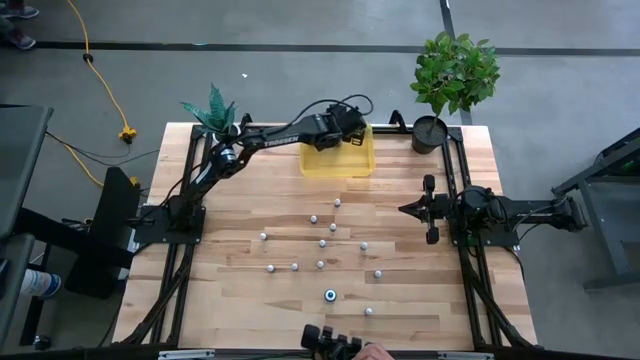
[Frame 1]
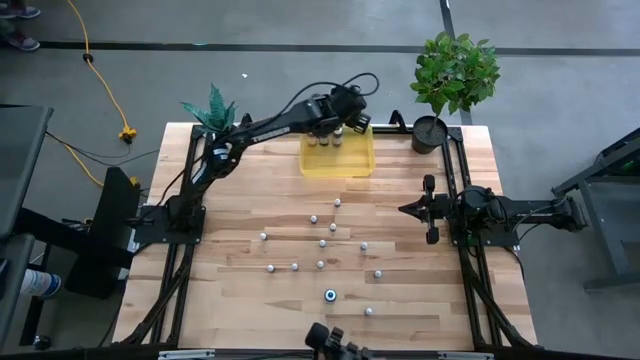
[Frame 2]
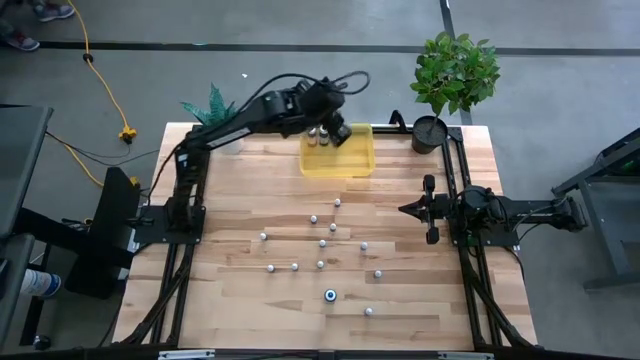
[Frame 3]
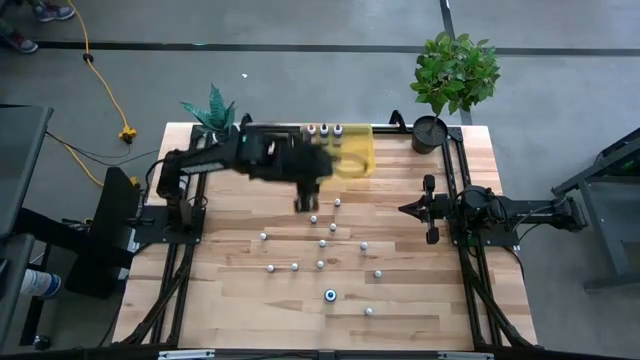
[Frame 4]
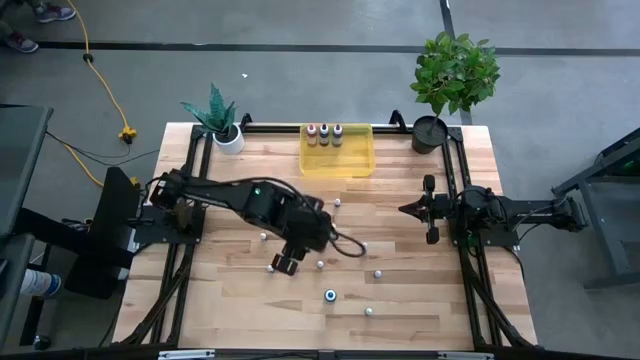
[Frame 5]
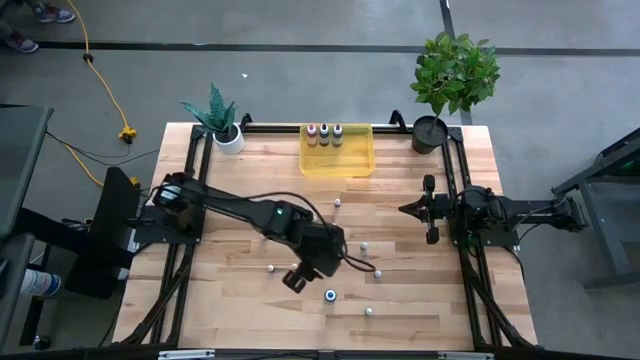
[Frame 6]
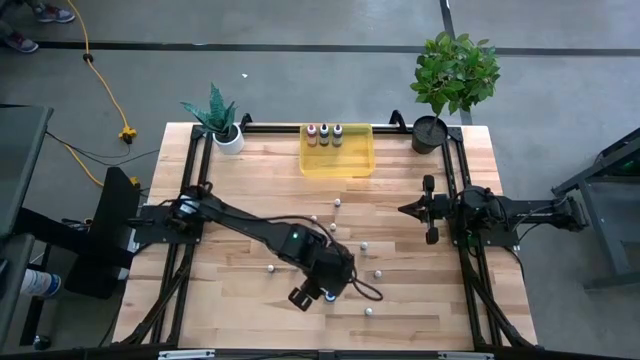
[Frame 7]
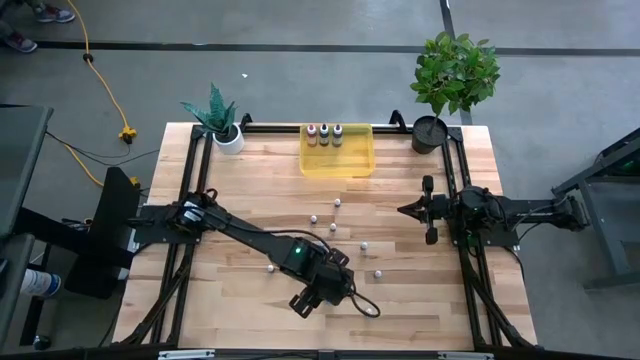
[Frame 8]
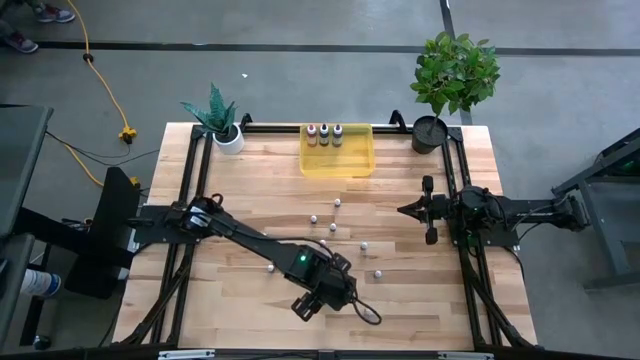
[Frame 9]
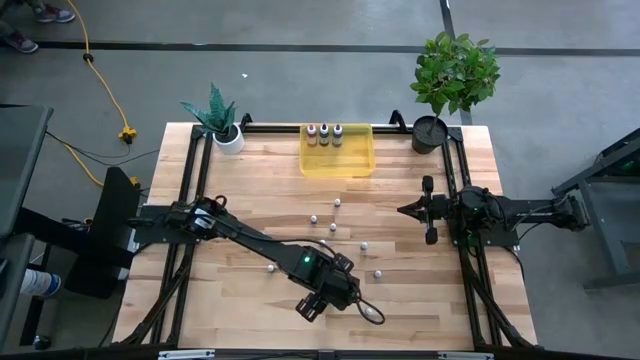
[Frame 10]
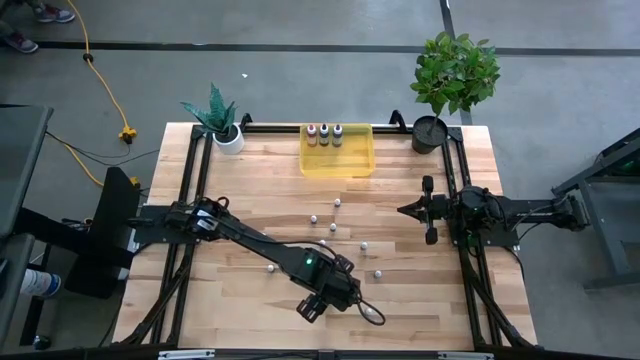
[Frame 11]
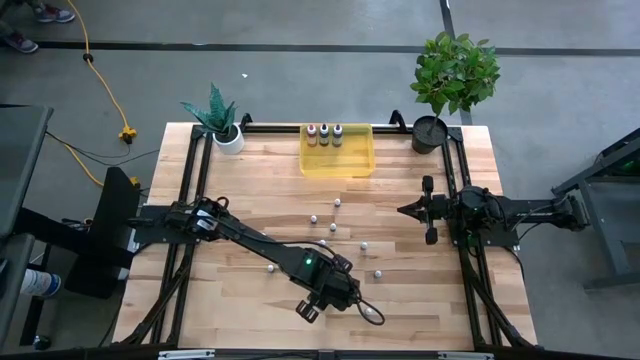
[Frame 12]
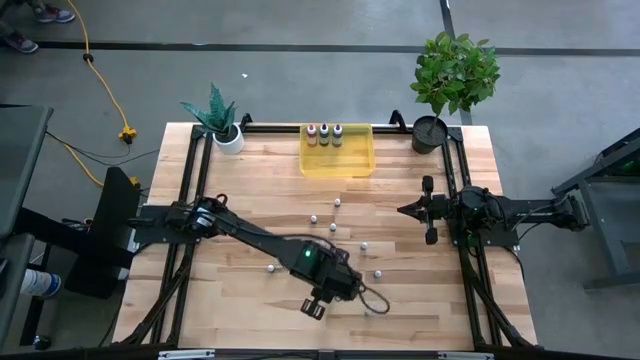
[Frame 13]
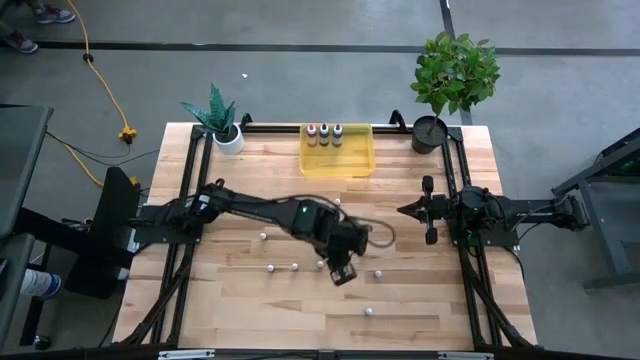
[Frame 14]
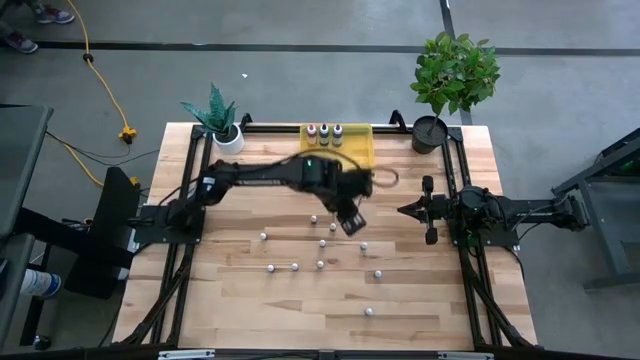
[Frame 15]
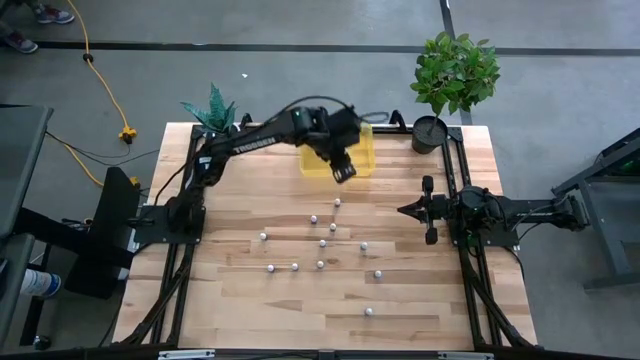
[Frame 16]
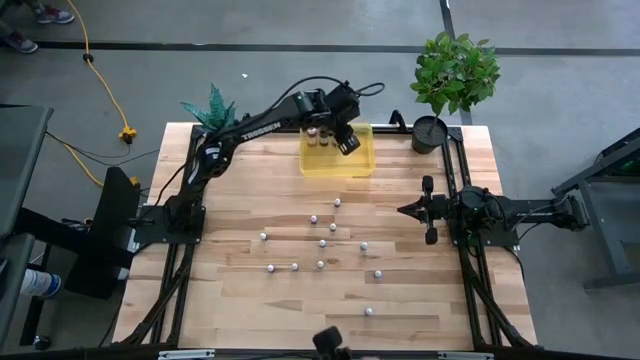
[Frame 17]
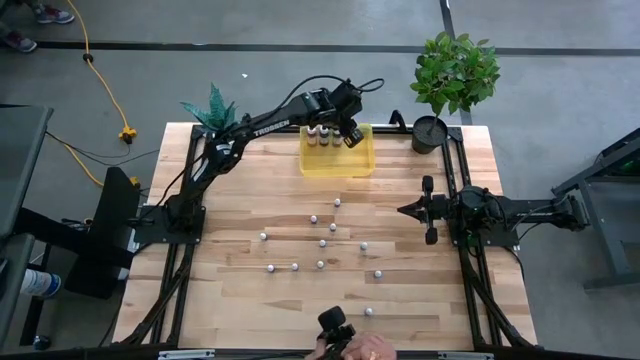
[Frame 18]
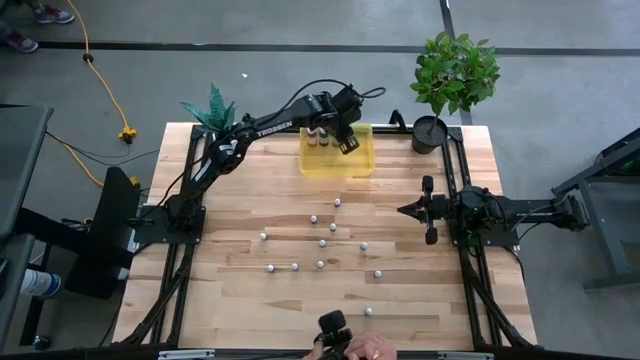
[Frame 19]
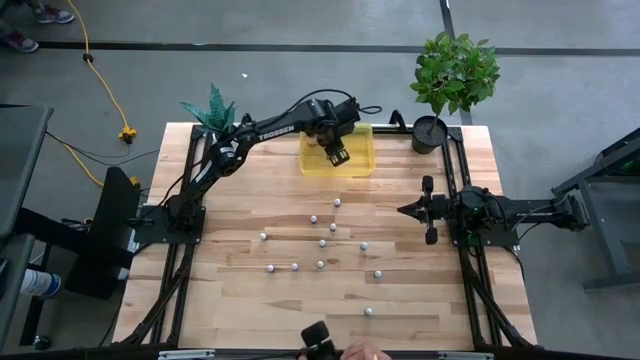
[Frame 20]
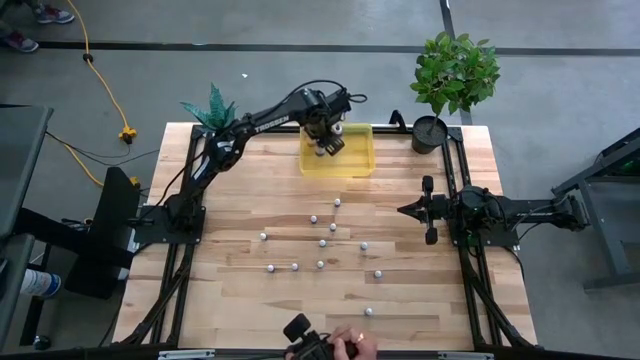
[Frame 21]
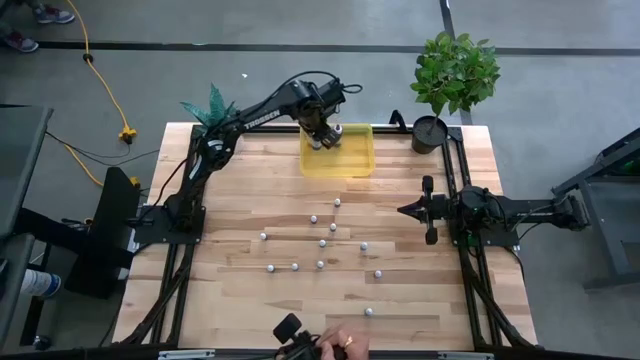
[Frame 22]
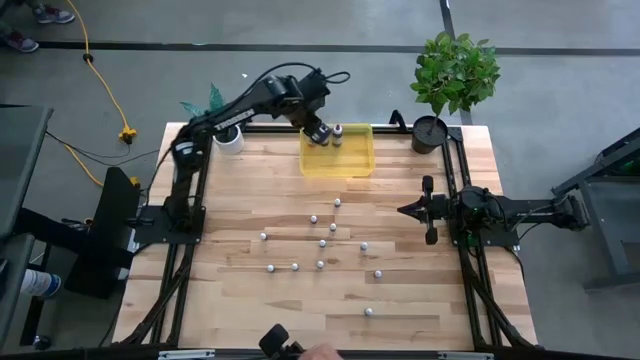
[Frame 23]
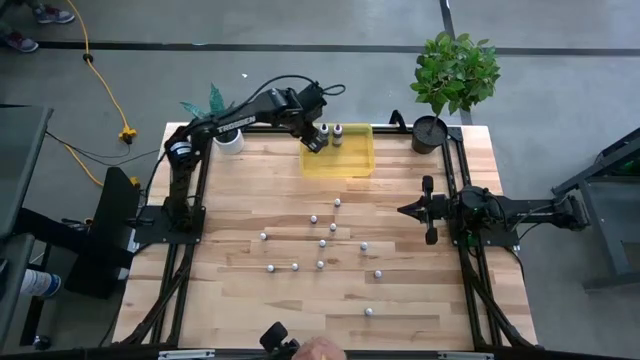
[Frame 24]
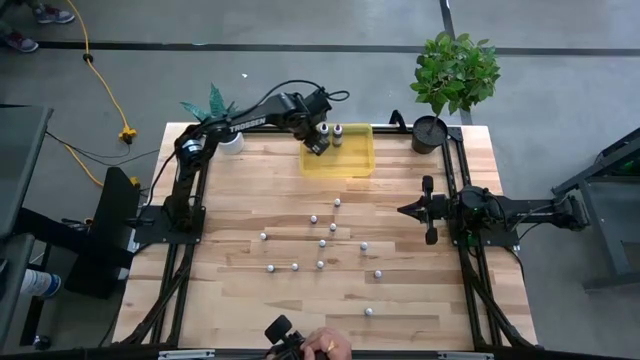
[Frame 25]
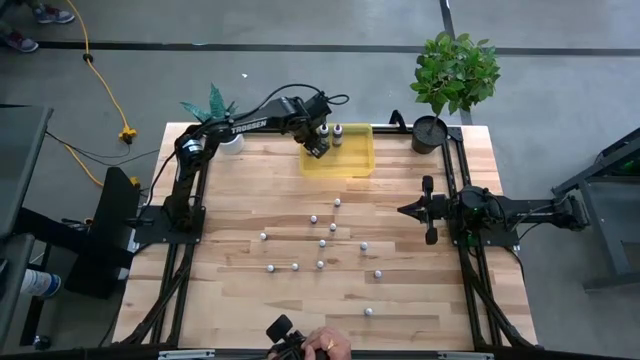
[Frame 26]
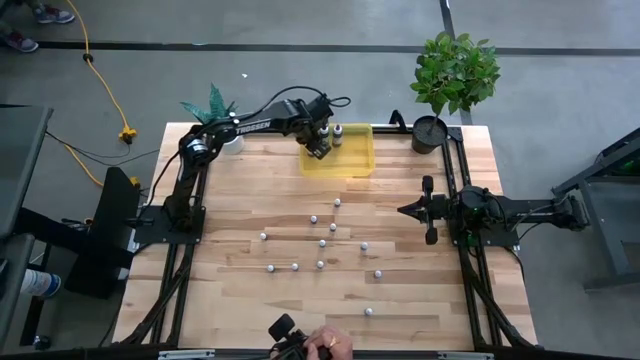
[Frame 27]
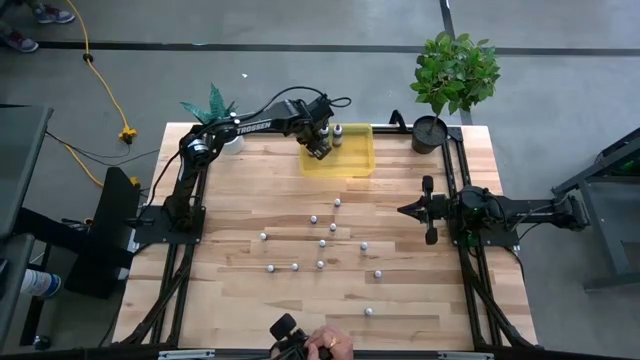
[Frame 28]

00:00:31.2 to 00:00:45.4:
Task: Pick & Place food coloring
Put the large blue food coloring bottle into the yellow bin

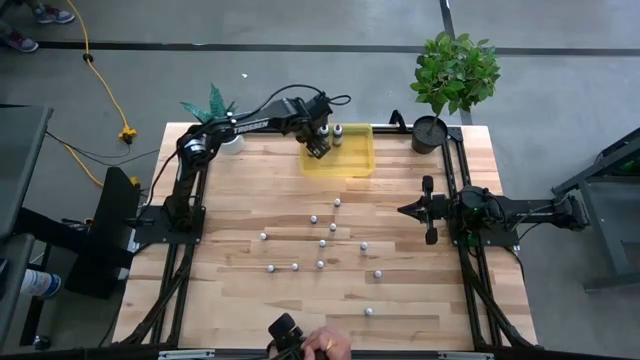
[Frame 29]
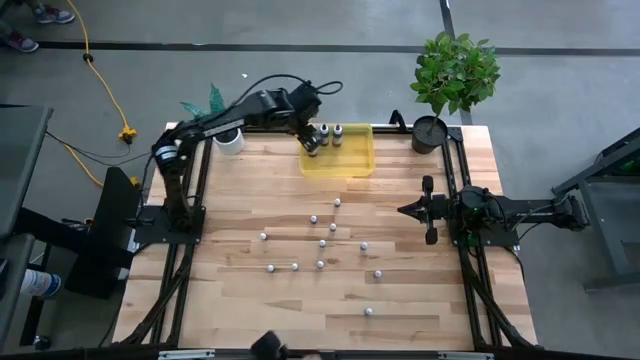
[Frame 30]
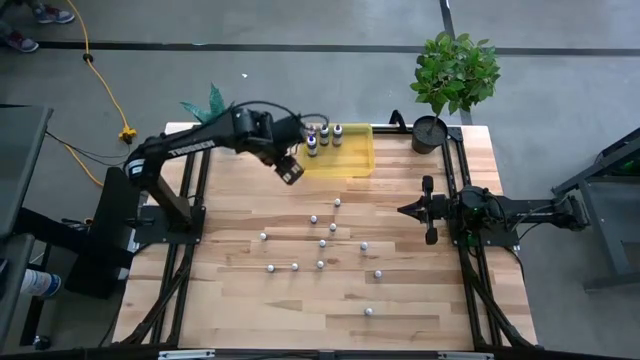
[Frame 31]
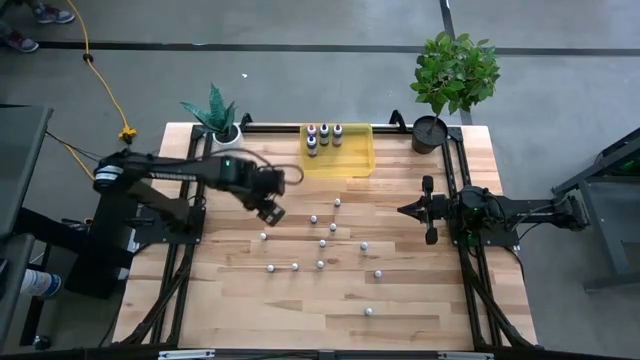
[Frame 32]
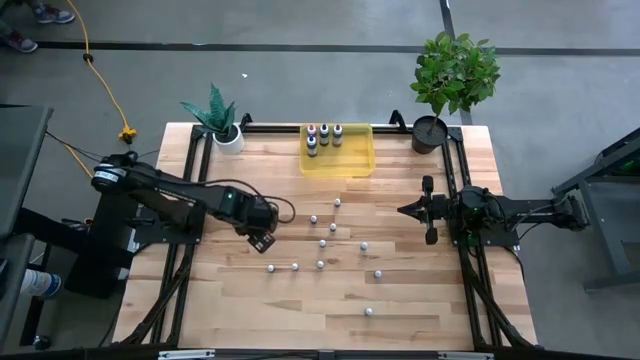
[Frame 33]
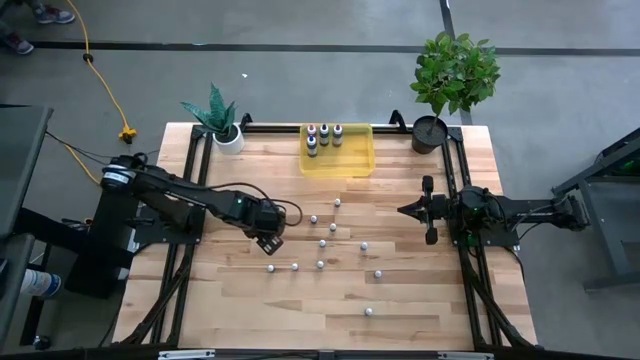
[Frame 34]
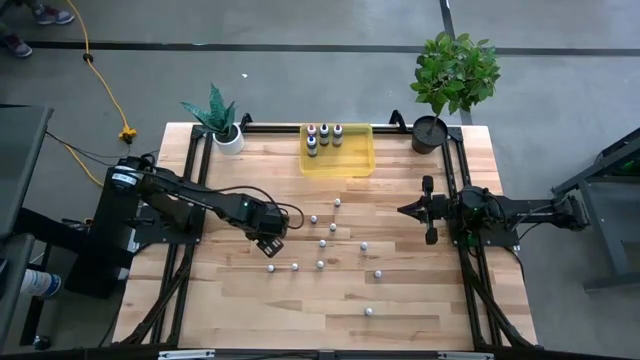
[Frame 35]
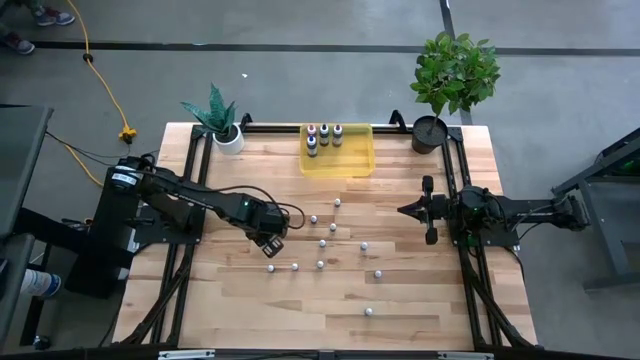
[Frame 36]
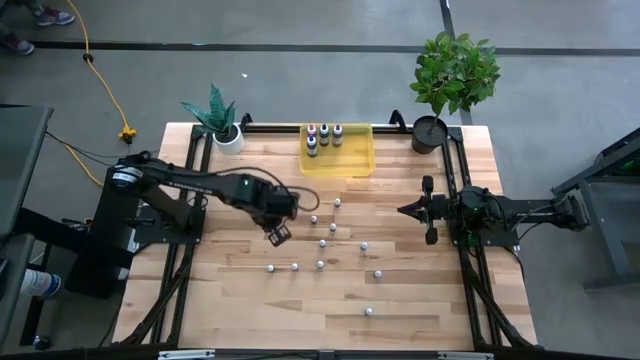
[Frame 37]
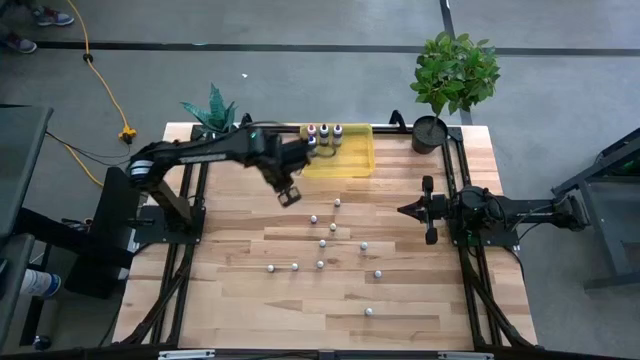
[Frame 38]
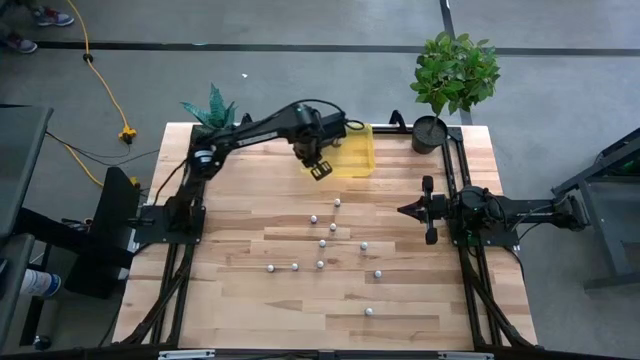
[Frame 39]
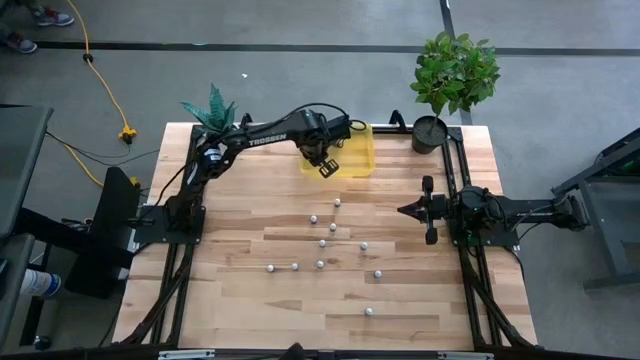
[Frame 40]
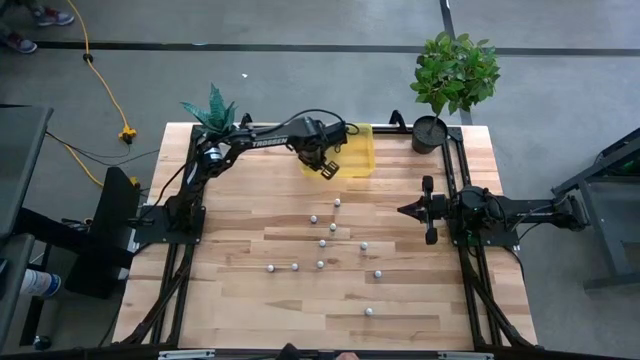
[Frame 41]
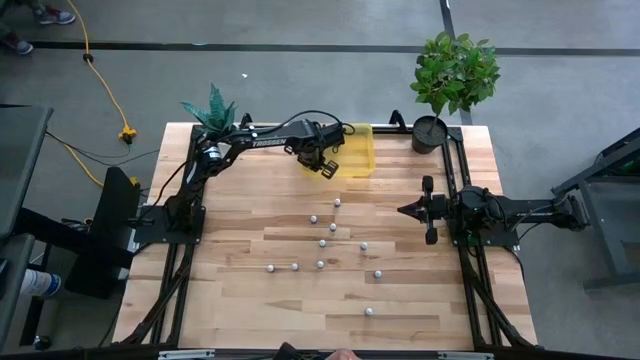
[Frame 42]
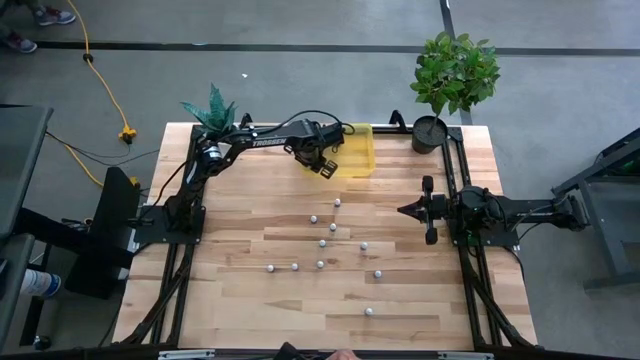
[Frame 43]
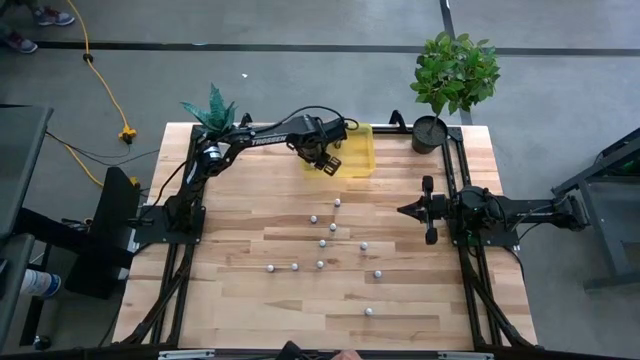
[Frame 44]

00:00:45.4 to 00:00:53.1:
Put the small black food coloring bottle into the yellow bin
